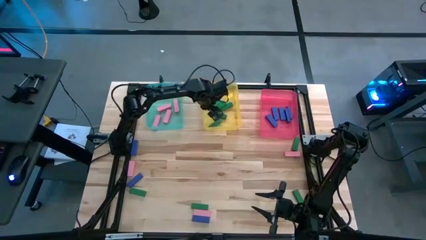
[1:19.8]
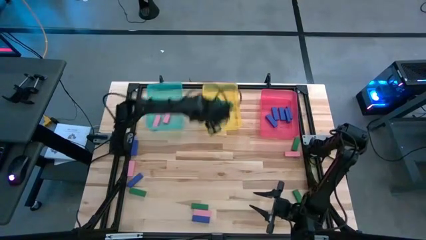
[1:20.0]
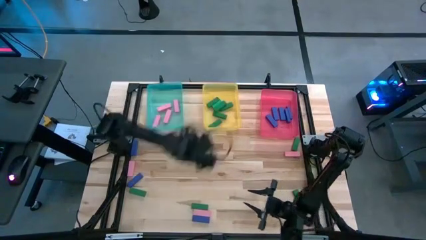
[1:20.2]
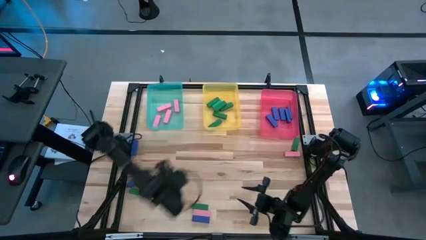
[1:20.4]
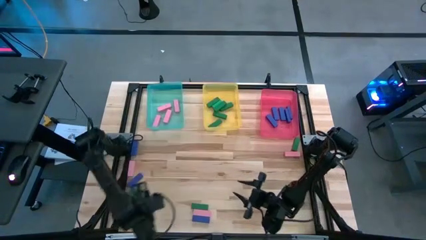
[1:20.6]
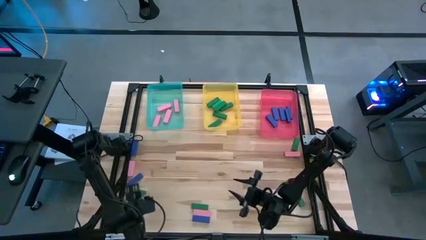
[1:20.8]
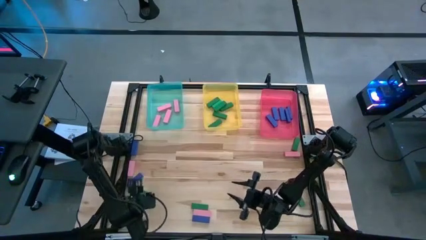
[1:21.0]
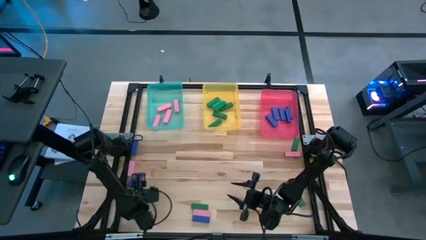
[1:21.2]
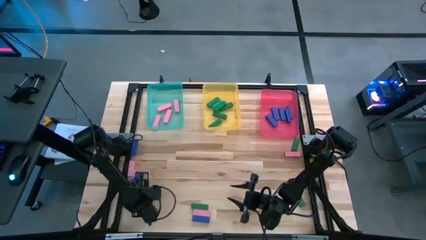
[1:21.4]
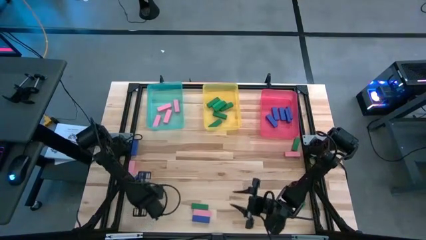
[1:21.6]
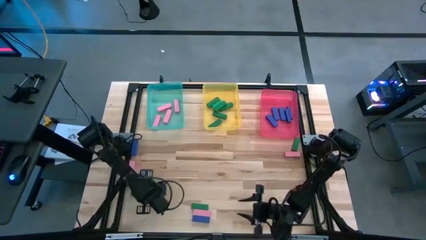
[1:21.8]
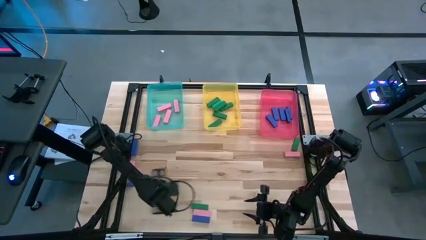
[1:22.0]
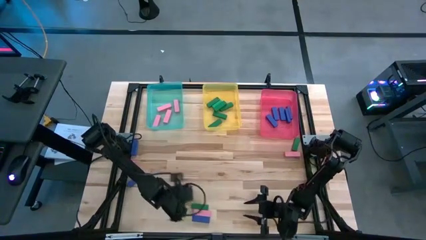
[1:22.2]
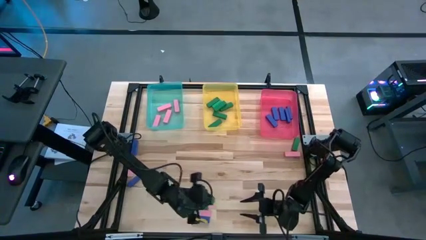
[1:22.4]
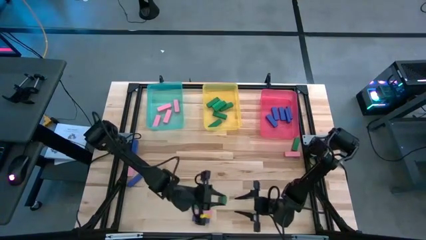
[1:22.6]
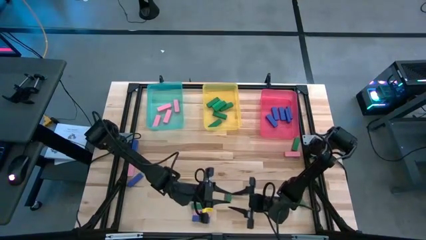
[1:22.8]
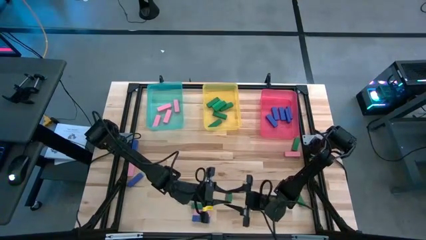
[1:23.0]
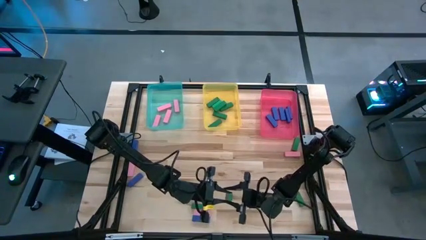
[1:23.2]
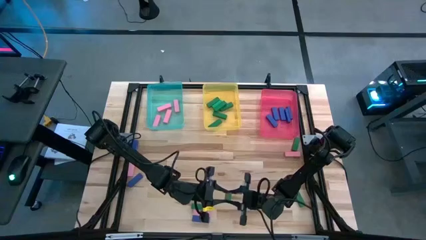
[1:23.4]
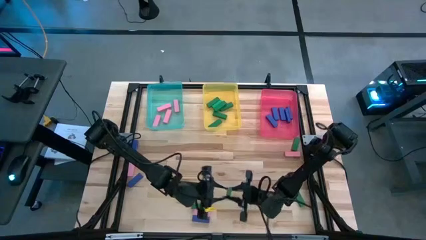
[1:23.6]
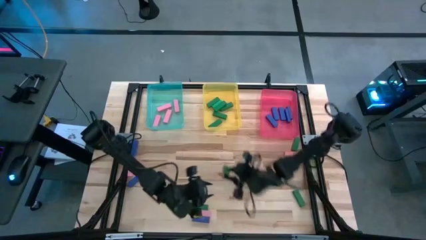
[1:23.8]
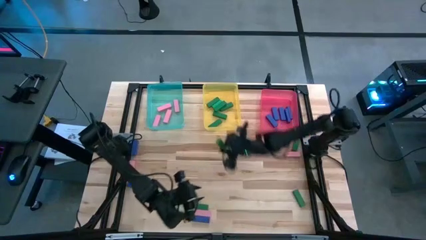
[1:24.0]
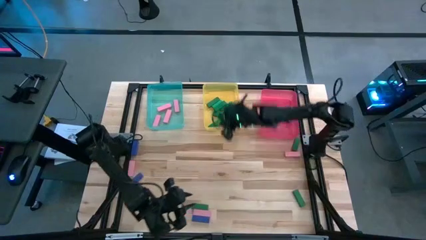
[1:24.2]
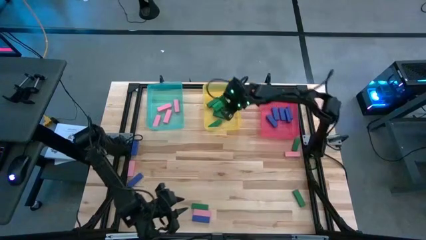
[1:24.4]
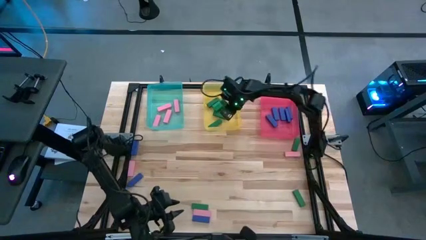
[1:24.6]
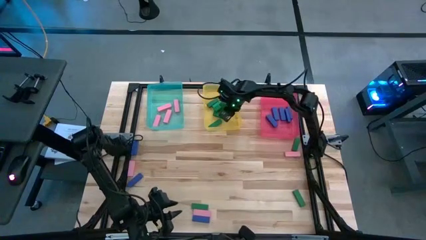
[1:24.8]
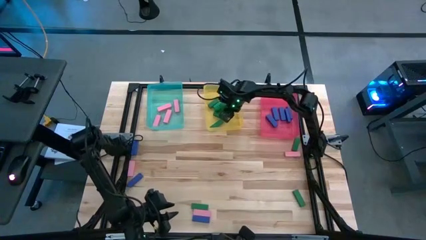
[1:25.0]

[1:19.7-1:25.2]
Task: Sort blocks
Put the green wooden block into the yellow bin

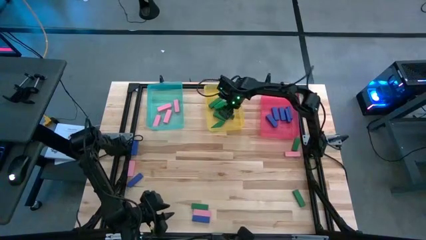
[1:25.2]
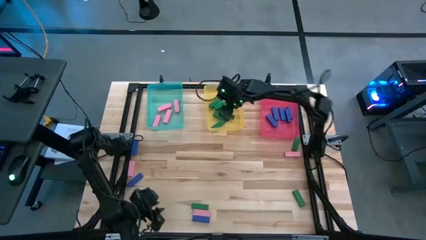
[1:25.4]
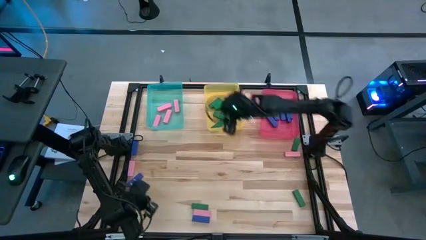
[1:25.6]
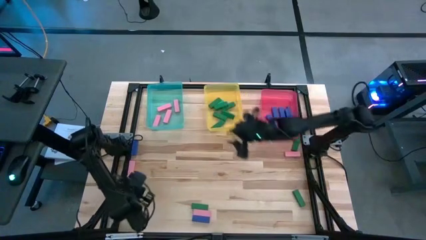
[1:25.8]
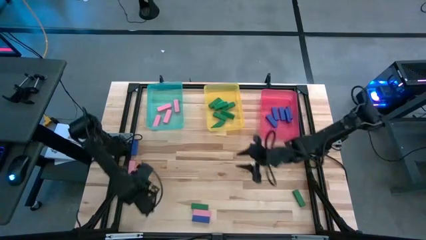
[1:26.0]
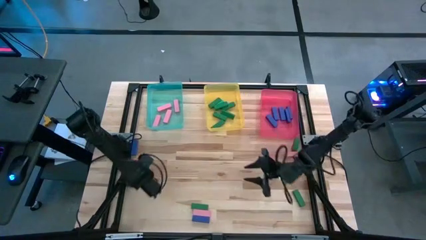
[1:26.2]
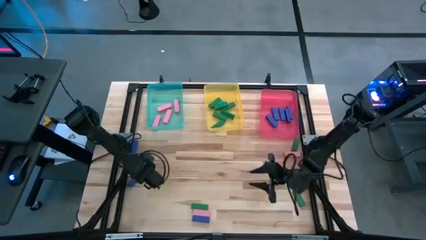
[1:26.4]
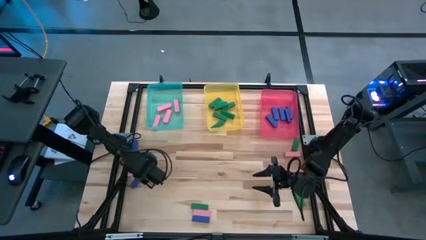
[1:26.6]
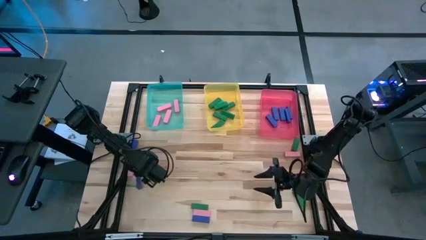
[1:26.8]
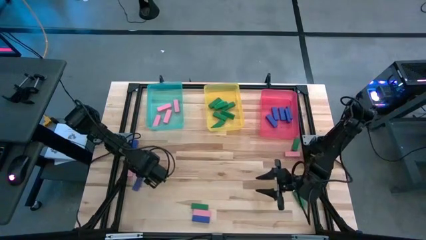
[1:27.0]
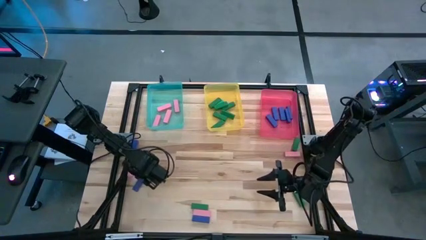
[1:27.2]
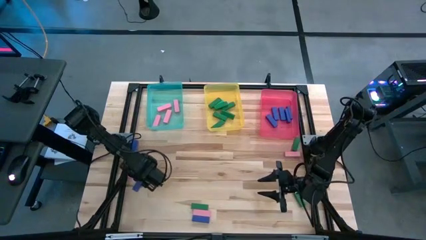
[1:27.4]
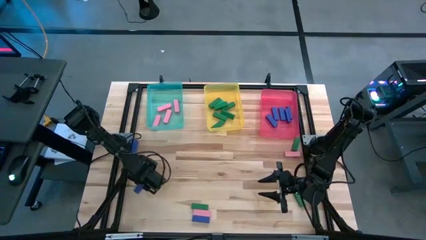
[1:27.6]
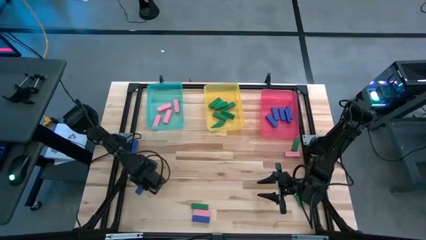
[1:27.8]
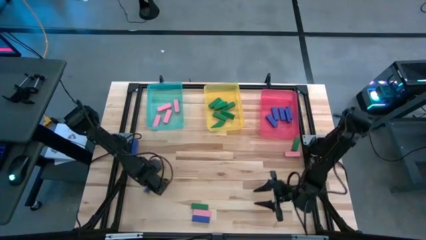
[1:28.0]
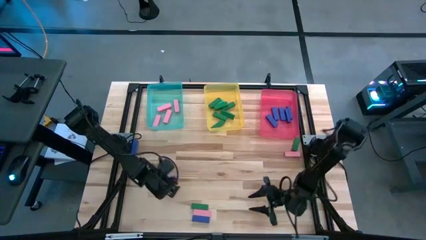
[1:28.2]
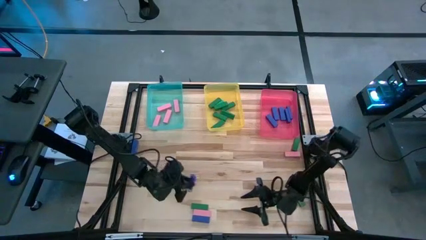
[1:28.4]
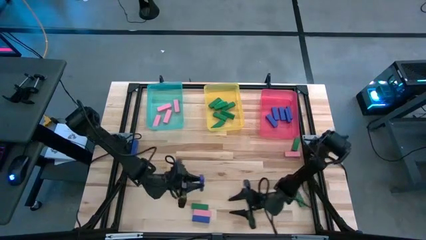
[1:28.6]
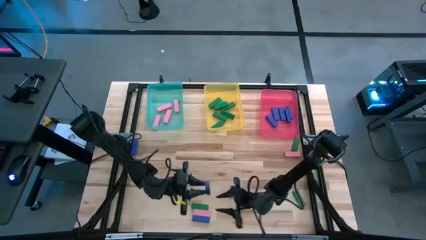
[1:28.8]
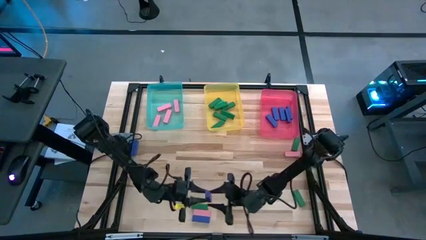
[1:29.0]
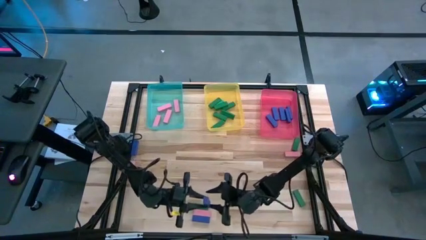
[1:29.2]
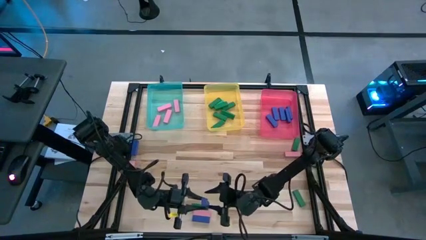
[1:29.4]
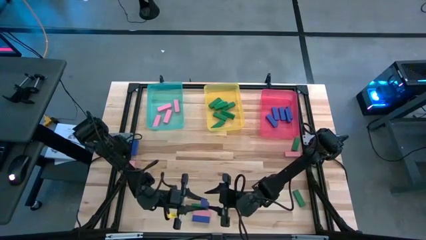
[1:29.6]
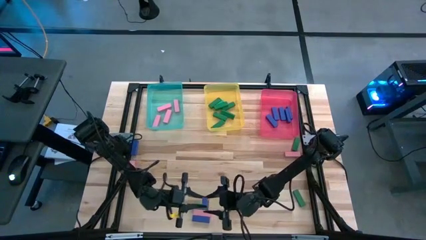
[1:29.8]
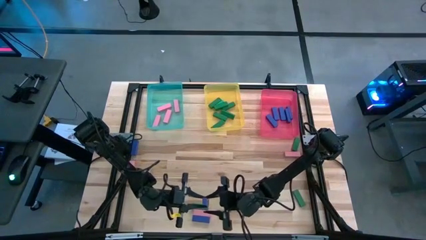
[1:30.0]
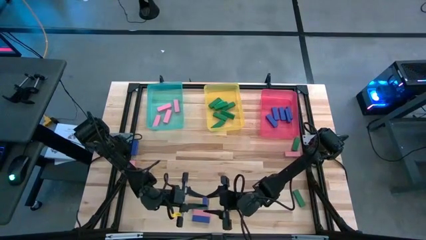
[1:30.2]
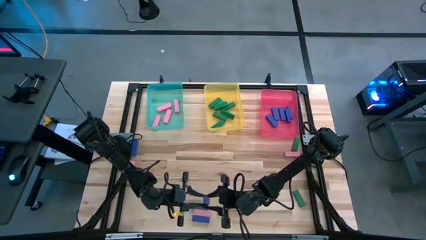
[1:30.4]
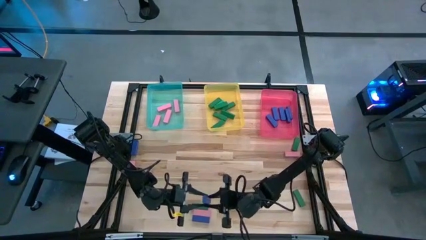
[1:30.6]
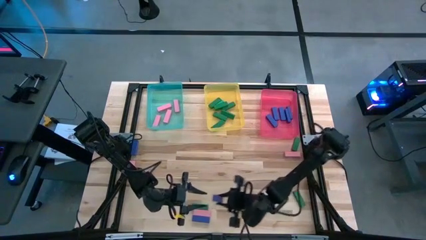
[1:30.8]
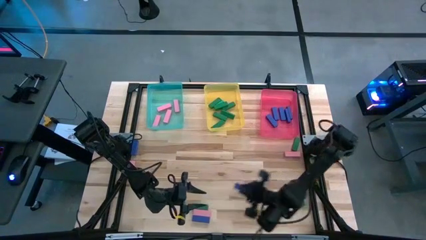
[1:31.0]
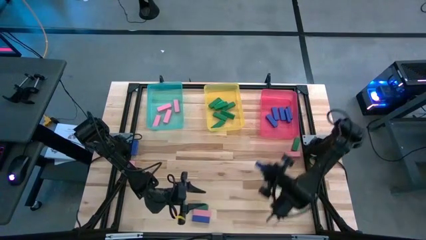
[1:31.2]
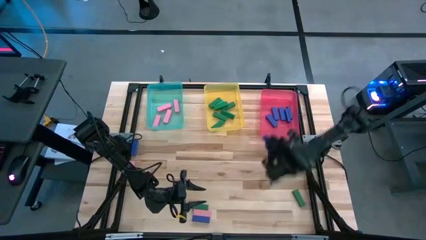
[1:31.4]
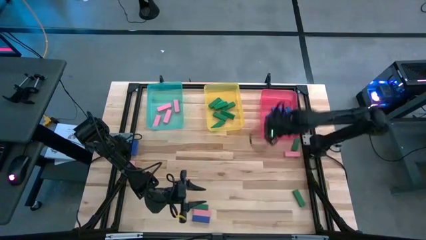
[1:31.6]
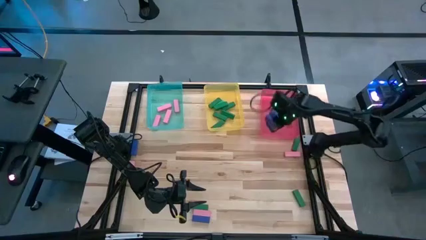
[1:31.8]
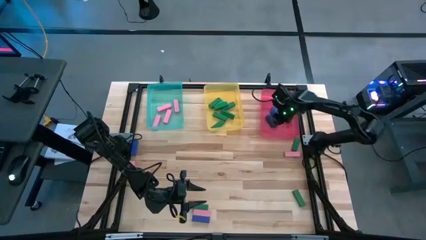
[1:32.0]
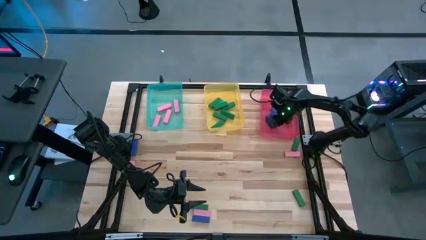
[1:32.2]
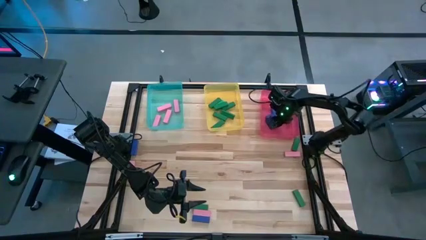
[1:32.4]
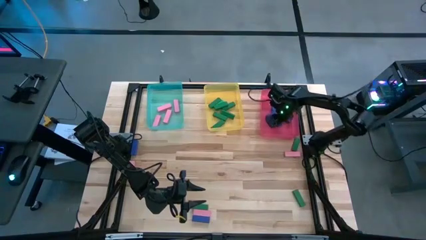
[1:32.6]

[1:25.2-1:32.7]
Put the blue wooden block into the red bin

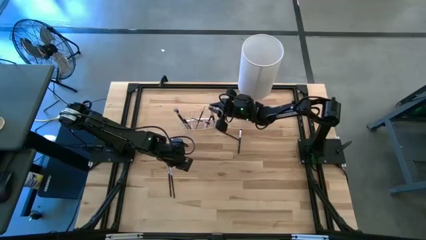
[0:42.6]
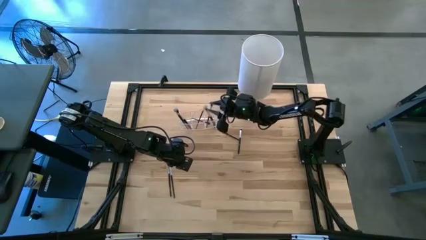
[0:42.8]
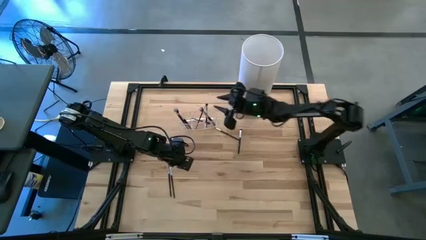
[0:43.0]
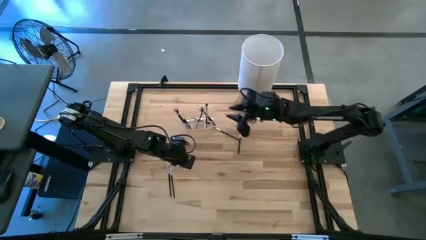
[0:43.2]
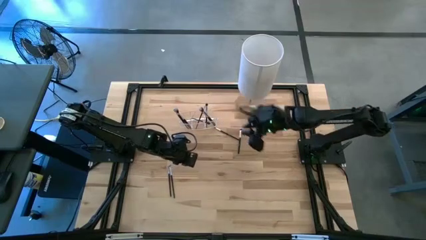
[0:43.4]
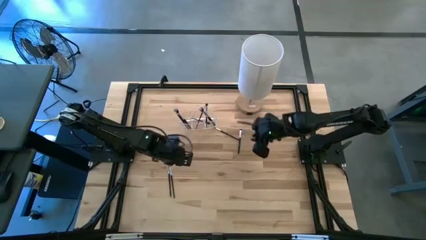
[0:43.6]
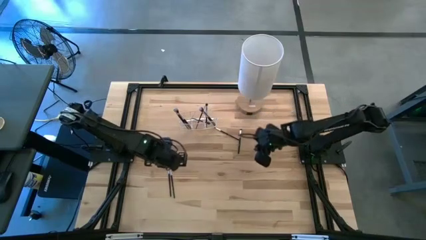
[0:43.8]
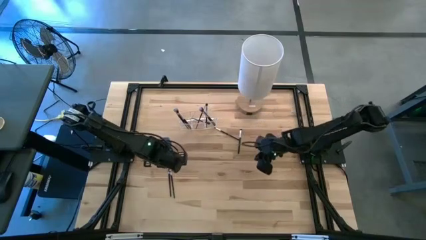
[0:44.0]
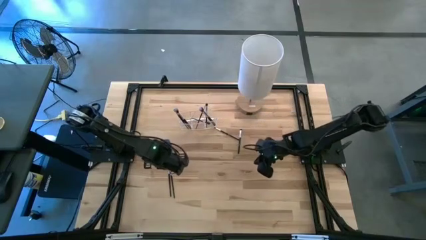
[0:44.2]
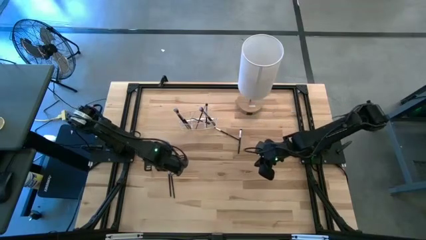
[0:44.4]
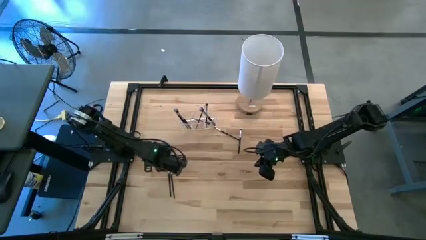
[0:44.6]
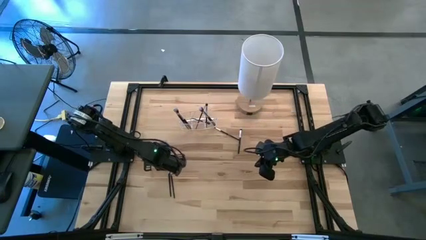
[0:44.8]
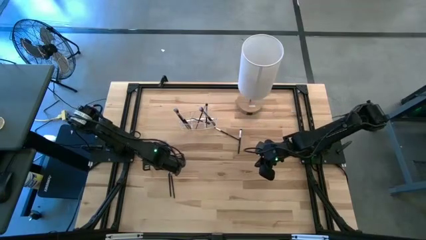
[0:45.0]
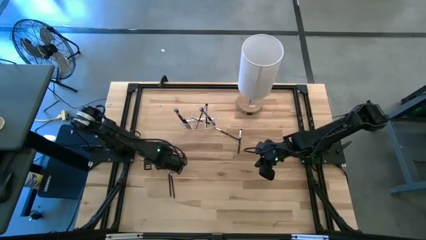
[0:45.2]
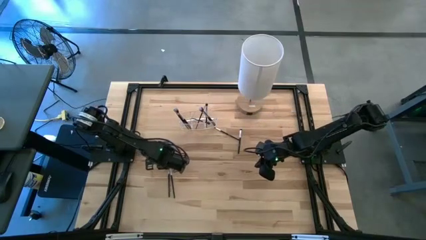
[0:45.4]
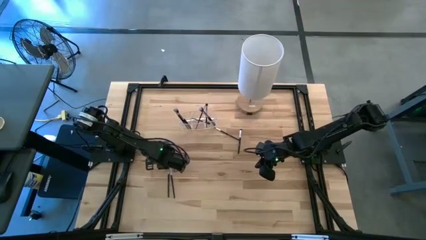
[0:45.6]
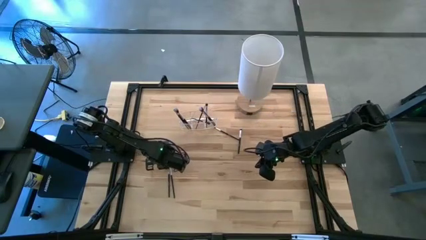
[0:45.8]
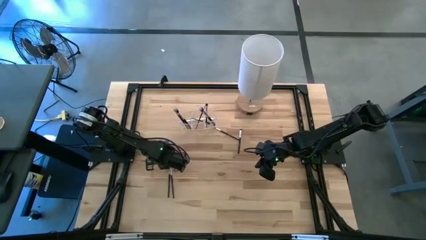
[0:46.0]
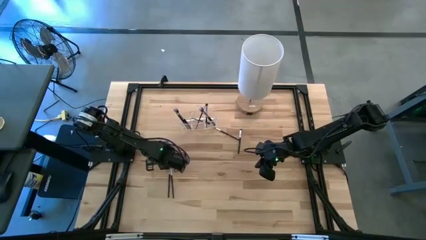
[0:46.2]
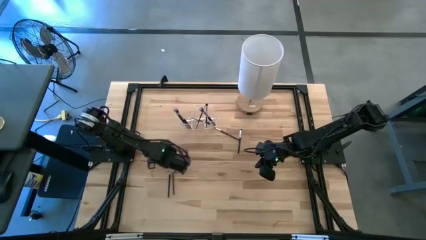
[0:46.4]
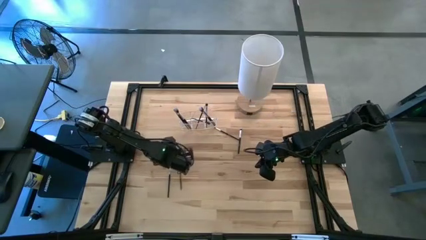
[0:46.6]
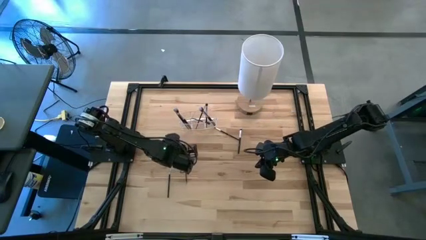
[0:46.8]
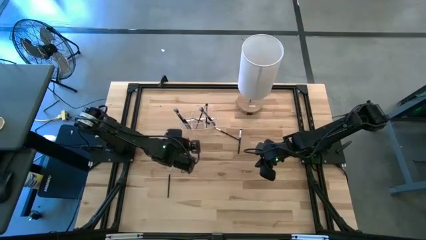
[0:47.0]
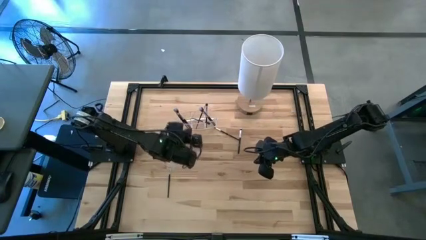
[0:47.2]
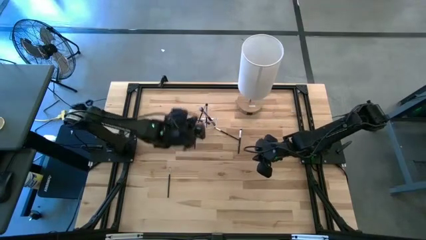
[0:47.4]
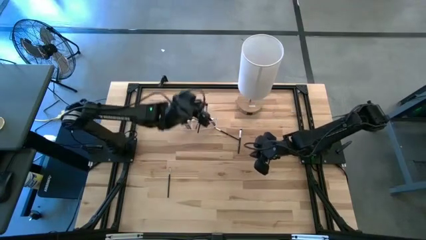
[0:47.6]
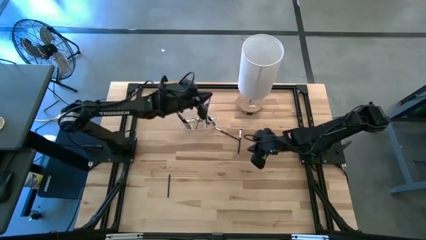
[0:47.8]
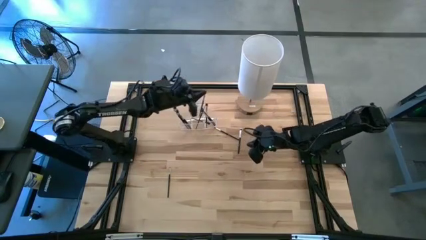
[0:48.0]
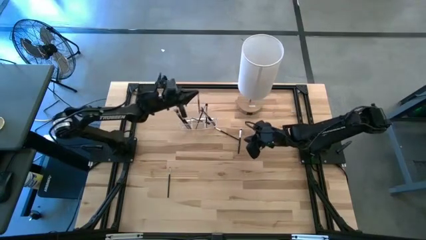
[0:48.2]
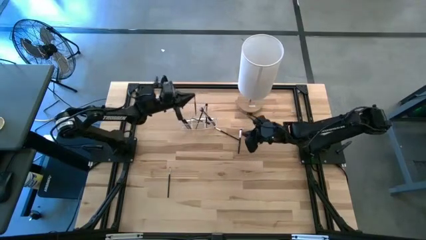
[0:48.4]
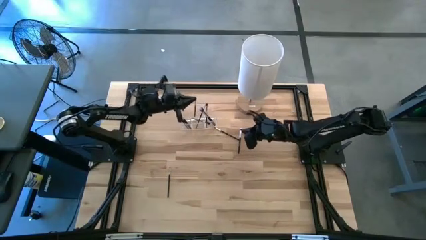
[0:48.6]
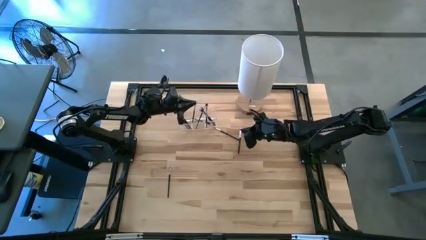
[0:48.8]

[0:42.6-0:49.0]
Task: Put items in baskets/containers
Put the black eyeshadow brush into the transparent organizer
